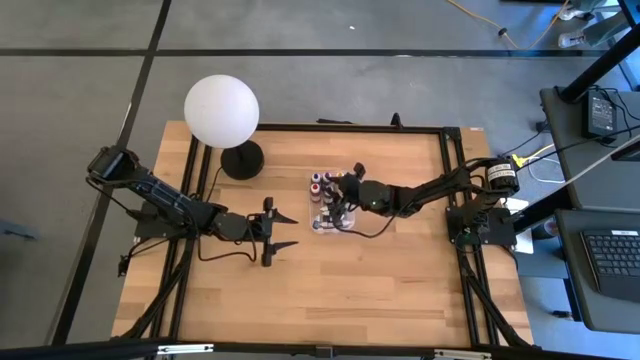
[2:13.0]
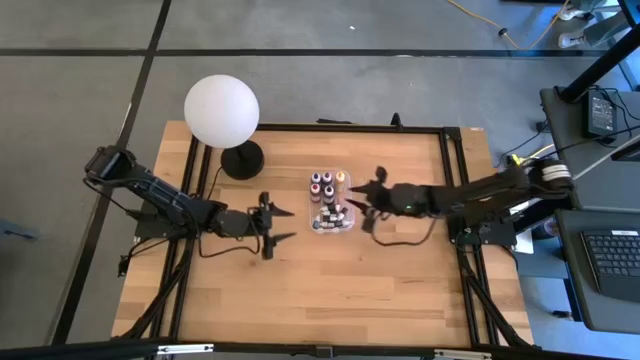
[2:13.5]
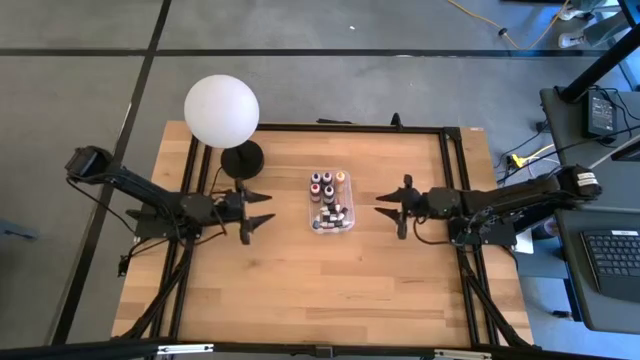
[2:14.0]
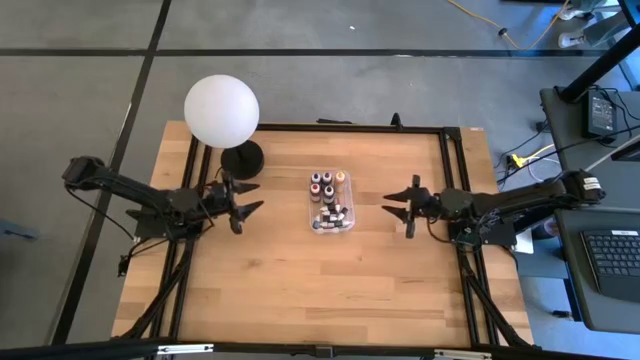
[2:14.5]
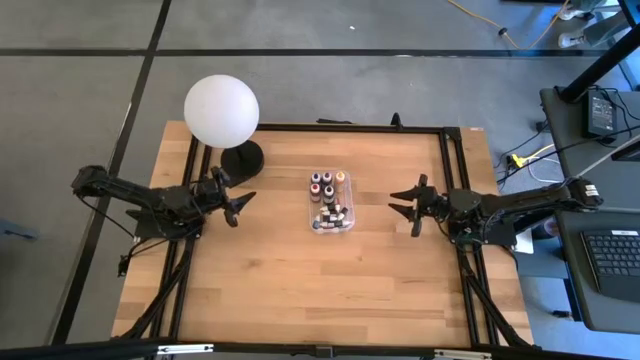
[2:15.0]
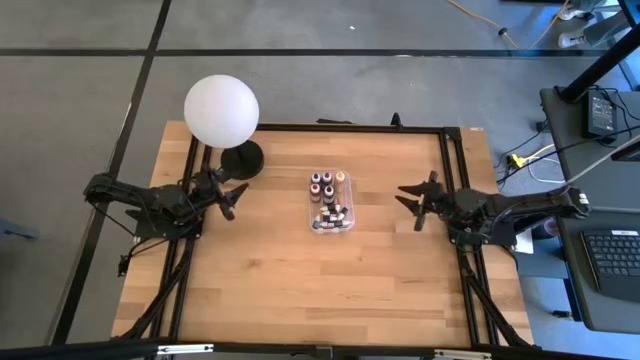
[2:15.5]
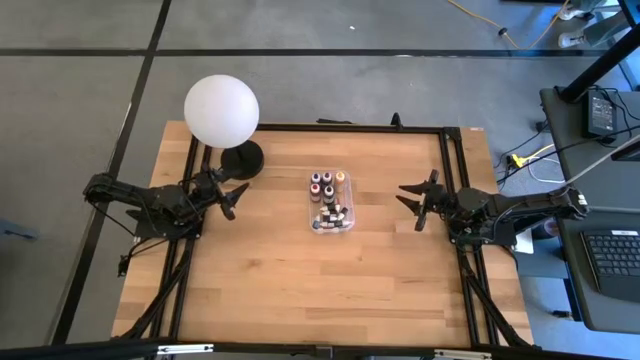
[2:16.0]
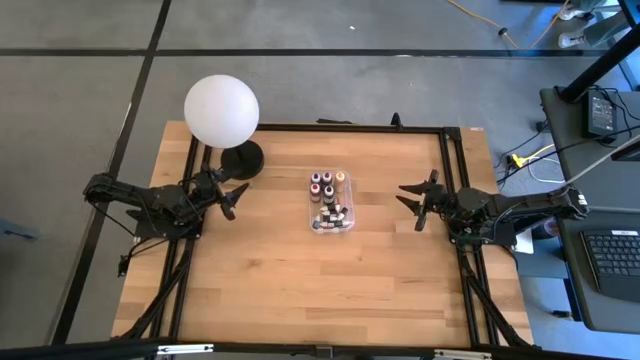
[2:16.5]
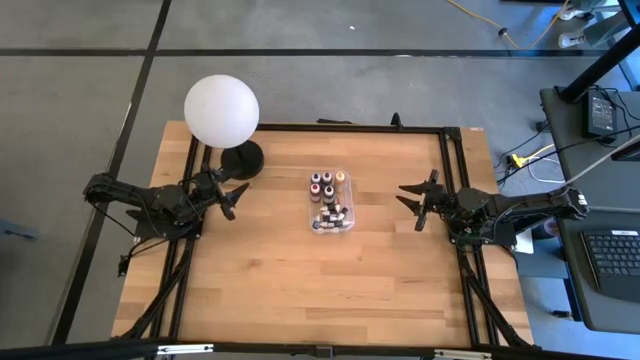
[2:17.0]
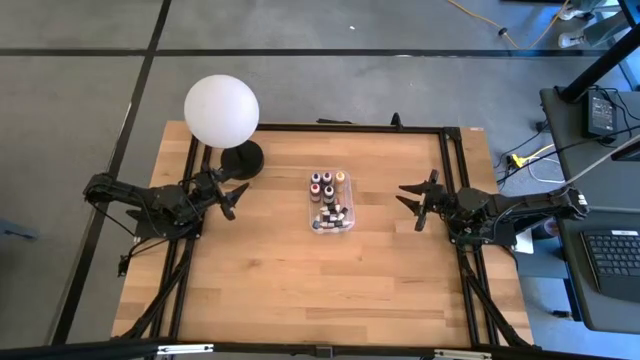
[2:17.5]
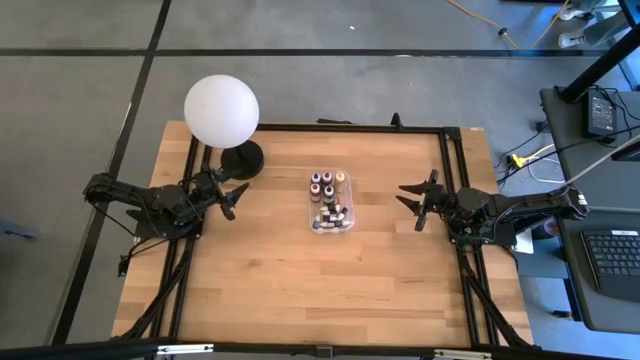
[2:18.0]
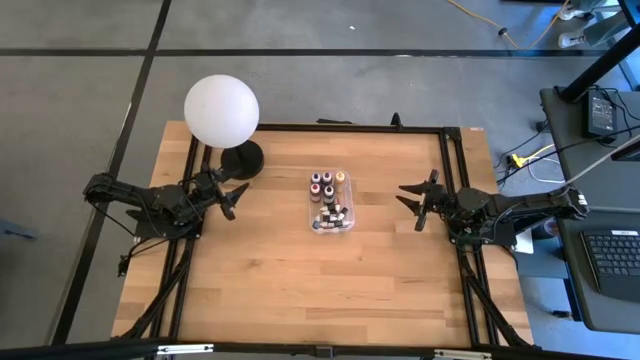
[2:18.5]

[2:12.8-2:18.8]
Task: Pick & Place food coloring
Return to Home Position

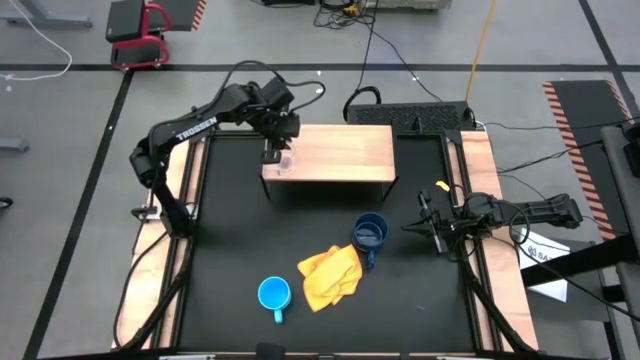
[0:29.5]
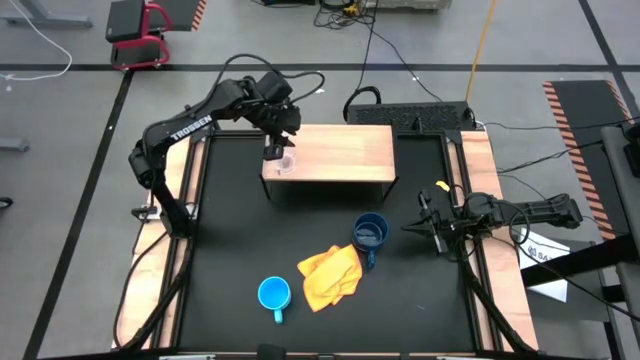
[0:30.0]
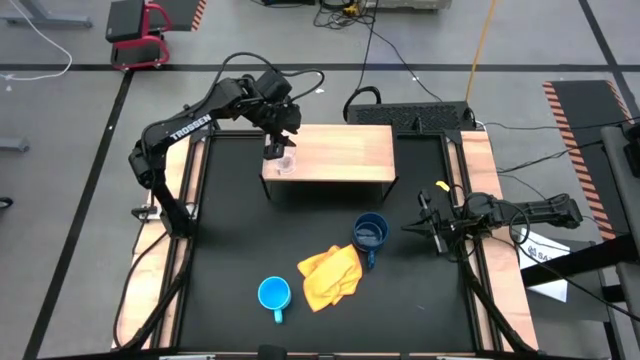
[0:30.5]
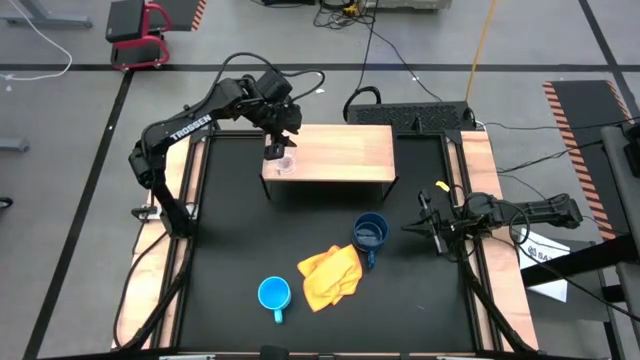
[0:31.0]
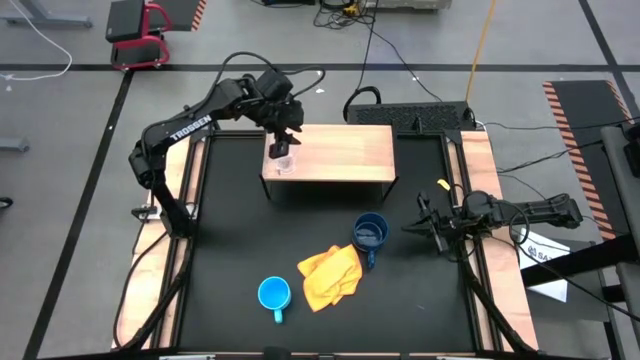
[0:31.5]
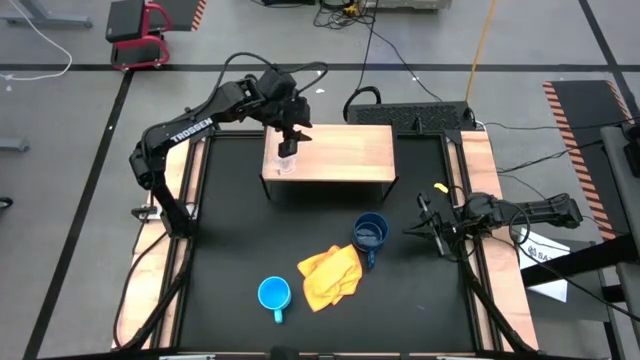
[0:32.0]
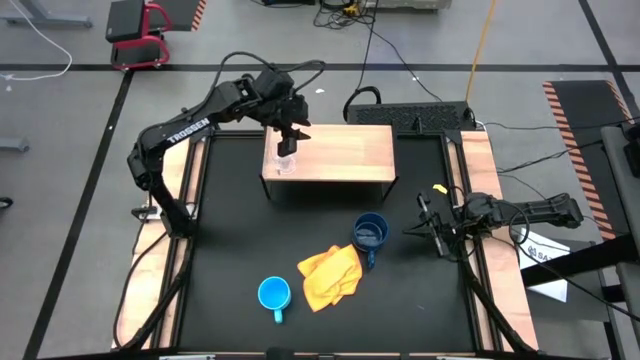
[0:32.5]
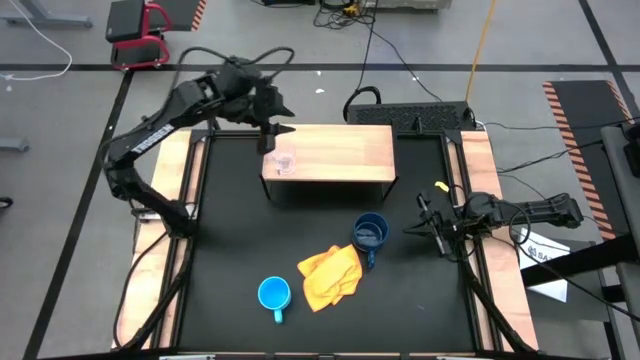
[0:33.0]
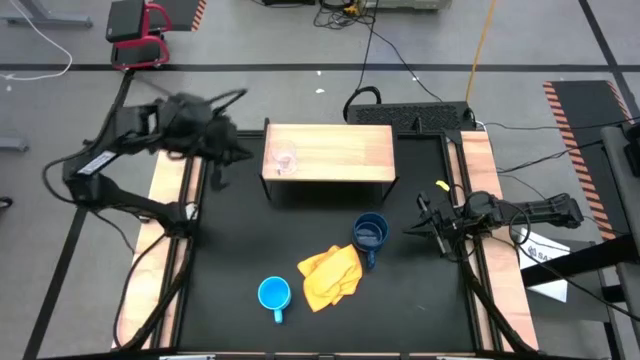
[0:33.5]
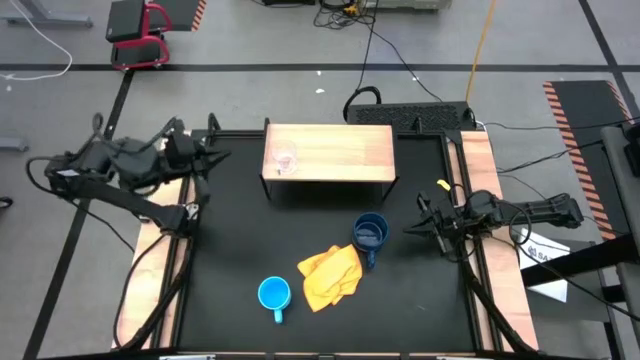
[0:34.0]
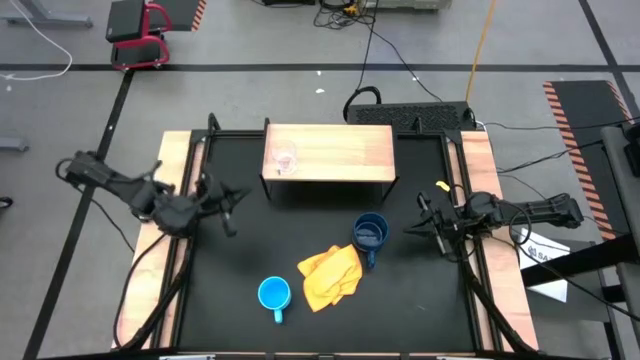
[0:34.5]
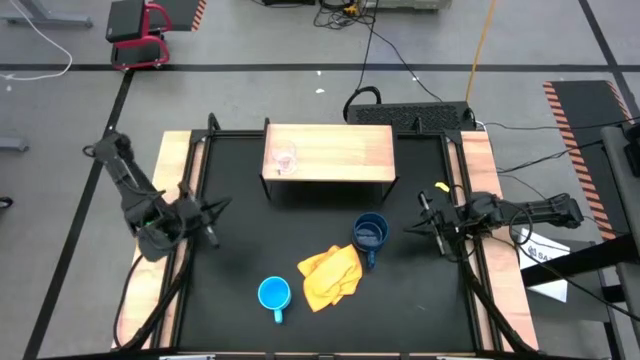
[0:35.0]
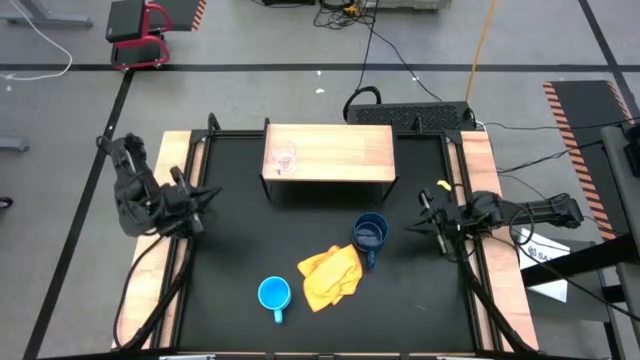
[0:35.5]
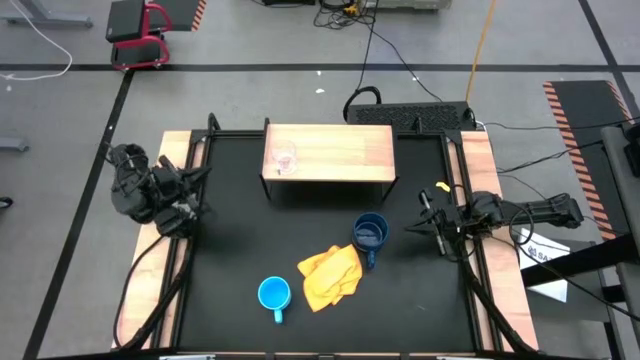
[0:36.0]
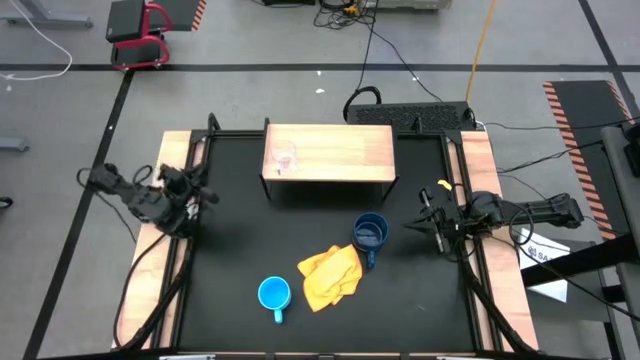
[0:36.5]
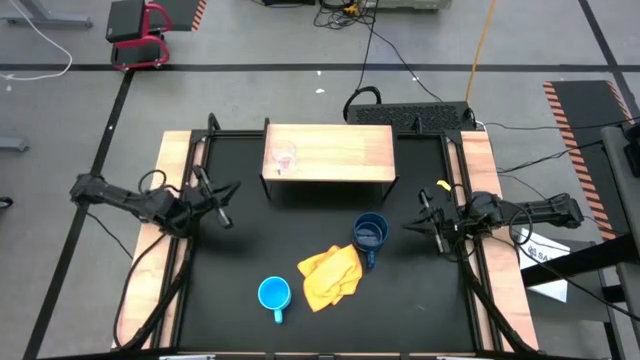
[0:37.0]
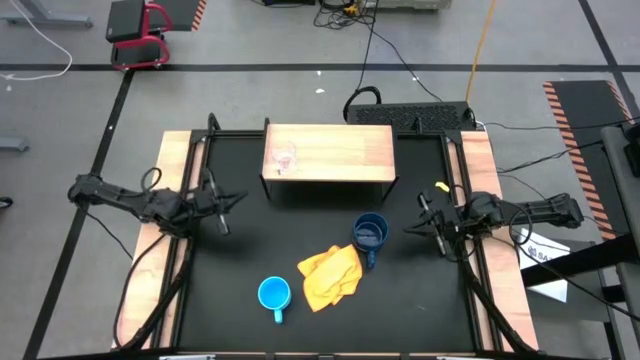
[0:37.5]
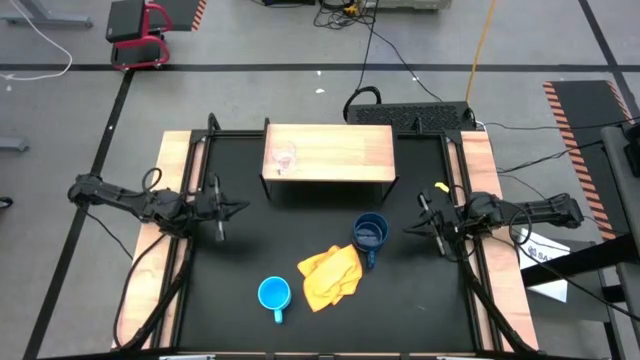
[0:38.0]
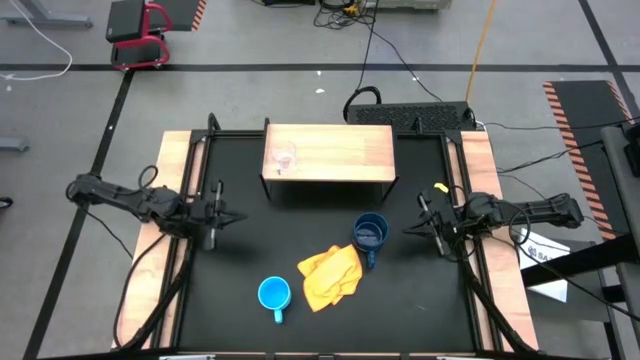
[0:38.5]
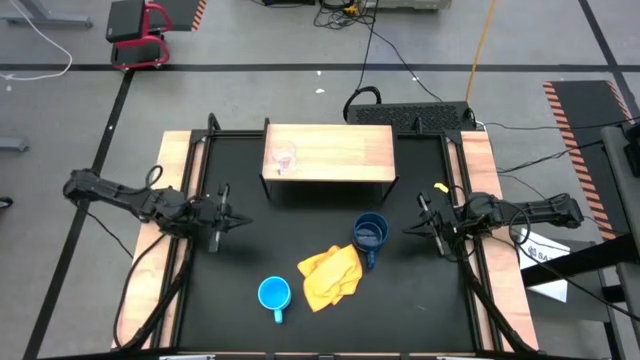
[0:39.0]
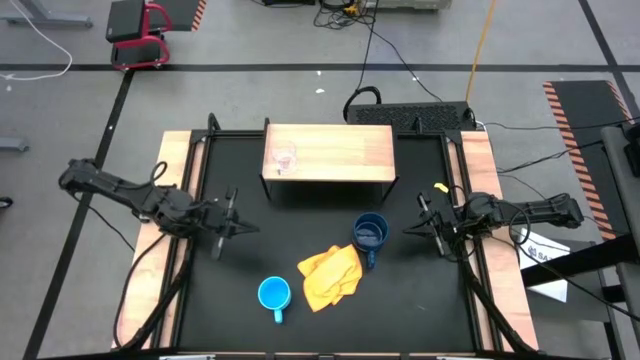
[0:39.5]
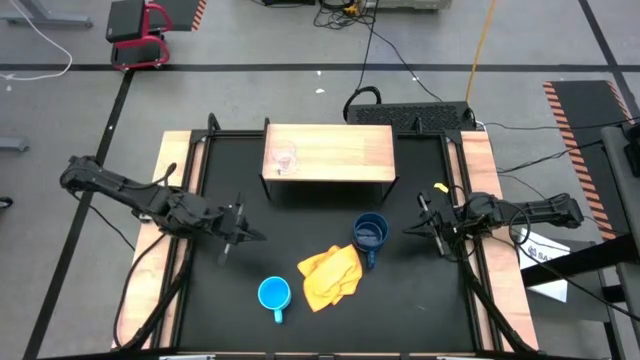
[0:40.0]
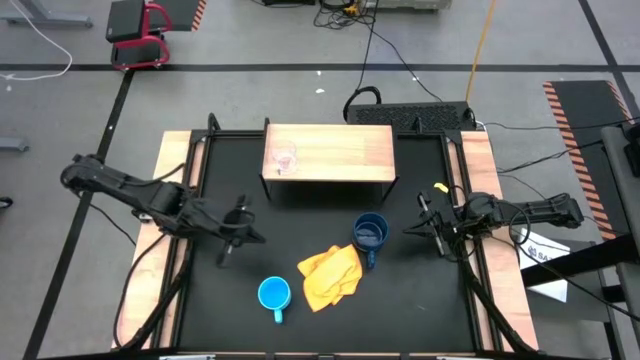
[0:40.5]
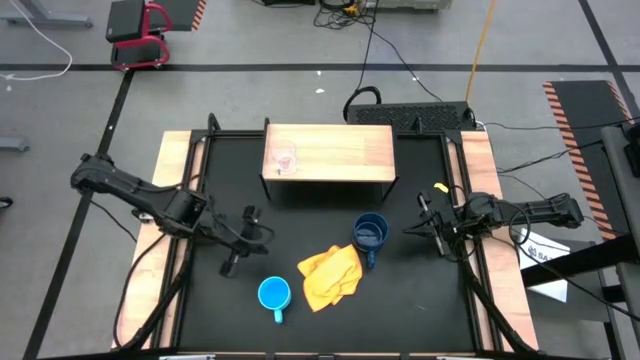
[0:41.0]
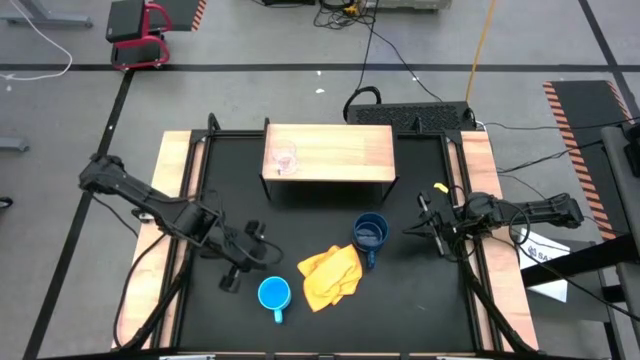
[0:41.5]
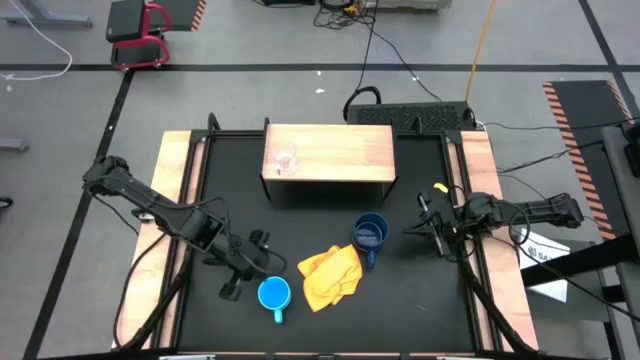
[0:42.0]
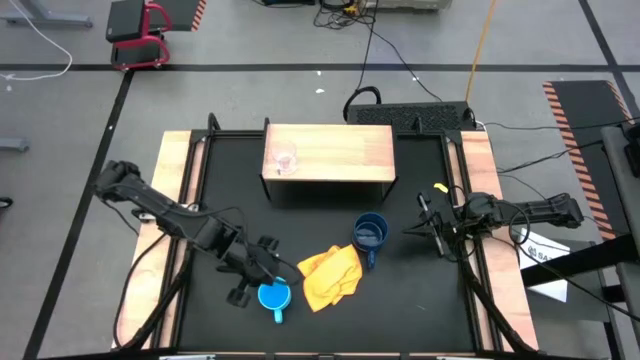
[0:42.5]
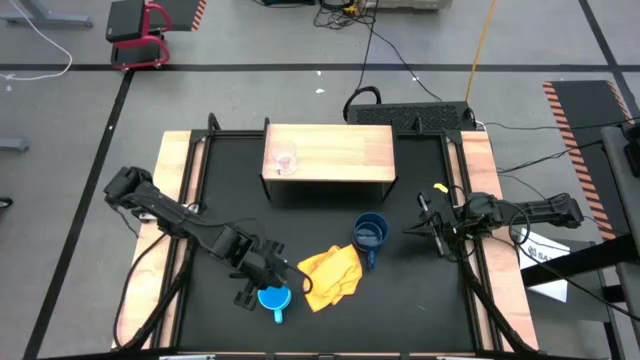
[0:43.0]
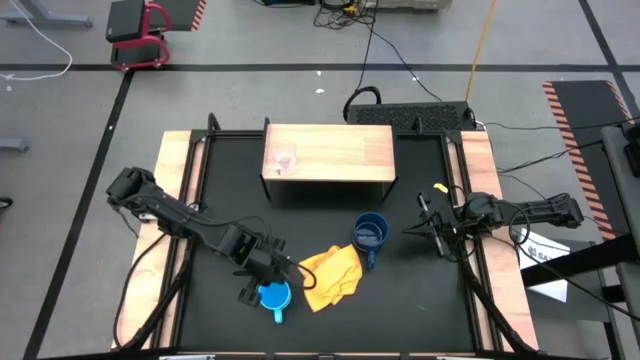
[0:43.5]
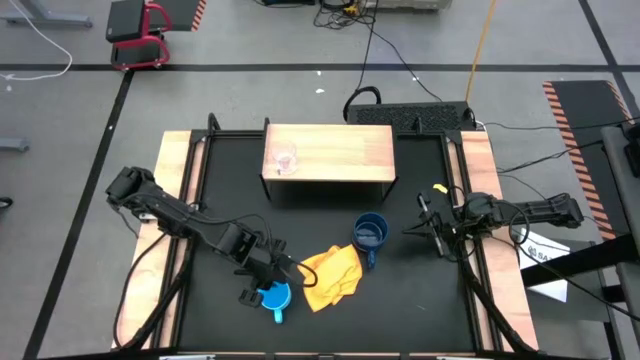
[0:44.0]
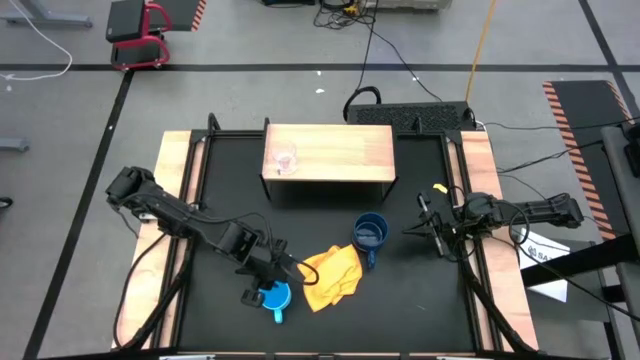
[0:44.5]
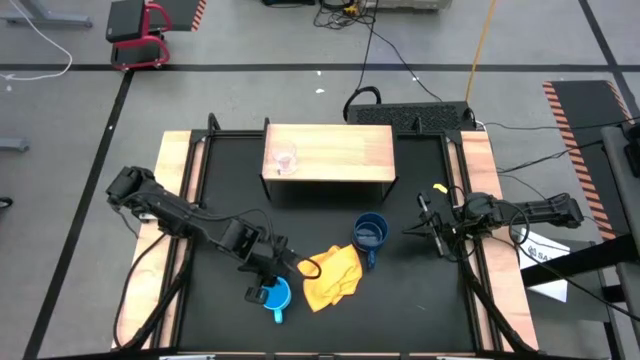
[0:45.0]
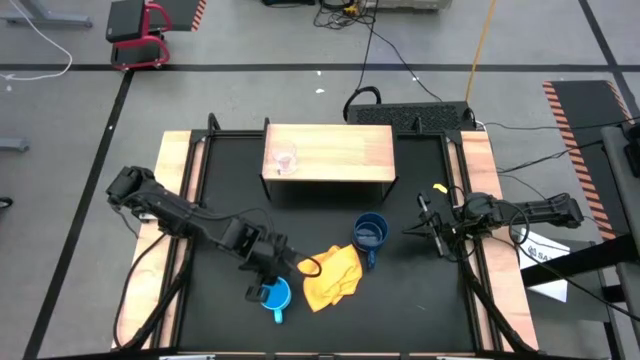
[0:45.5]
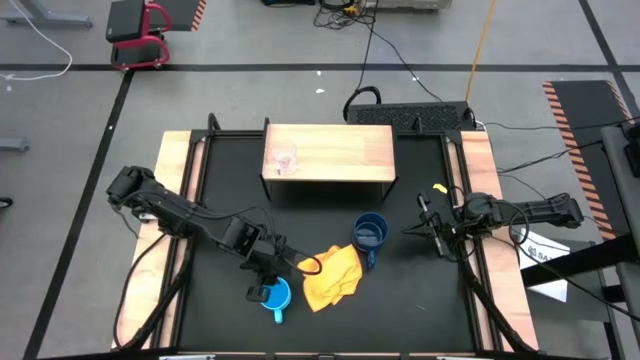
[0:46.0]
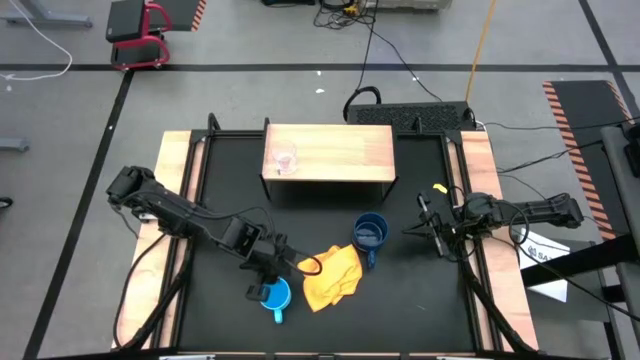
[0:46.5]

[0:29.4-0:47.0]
Task: Stack small to large cups/mugs on shelf
Put the light blue mug on the shelf
